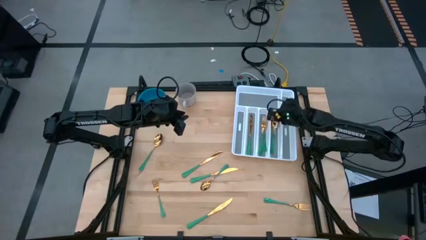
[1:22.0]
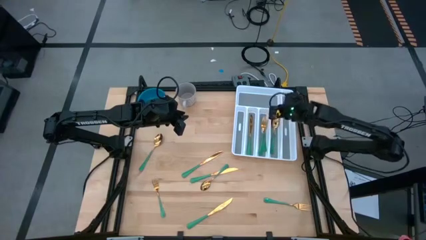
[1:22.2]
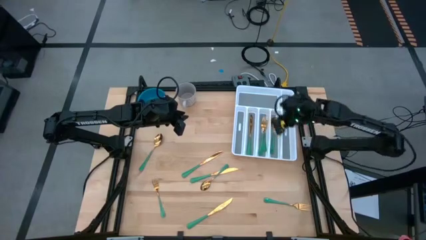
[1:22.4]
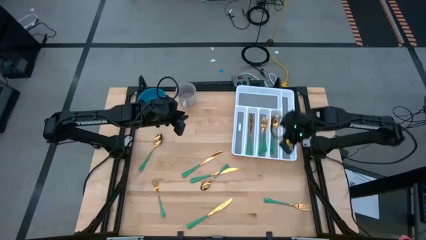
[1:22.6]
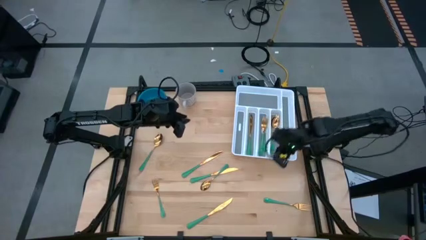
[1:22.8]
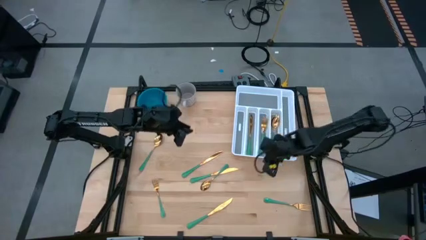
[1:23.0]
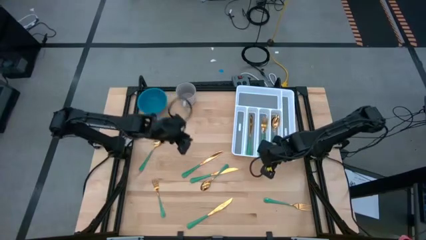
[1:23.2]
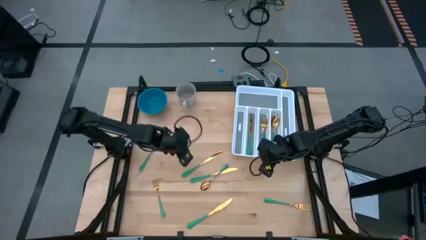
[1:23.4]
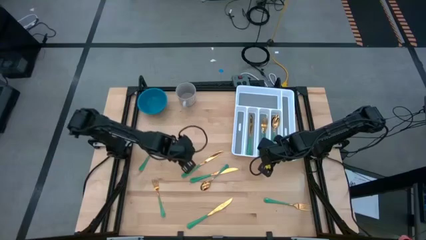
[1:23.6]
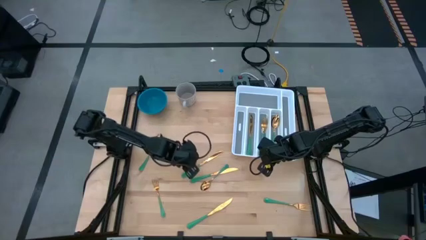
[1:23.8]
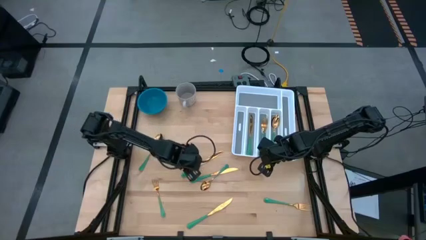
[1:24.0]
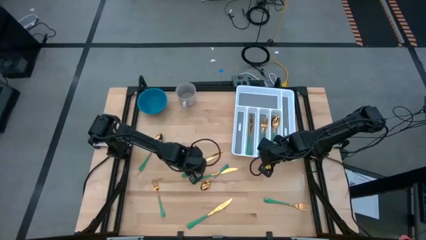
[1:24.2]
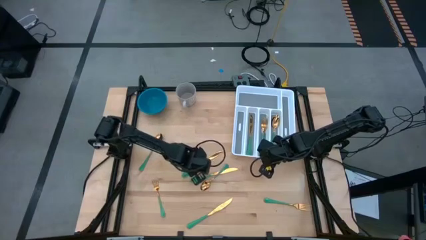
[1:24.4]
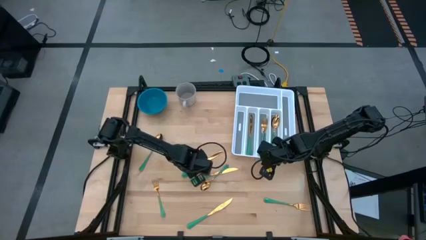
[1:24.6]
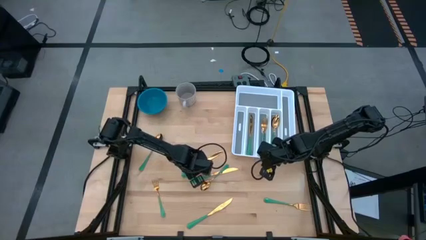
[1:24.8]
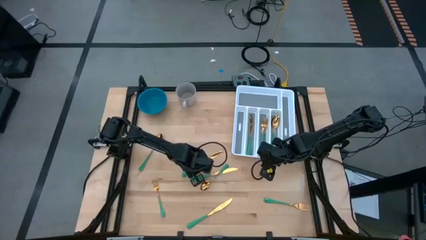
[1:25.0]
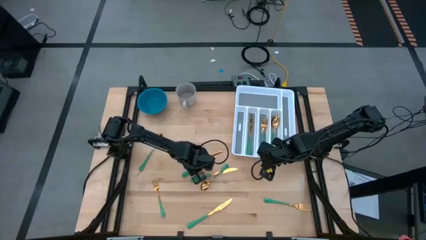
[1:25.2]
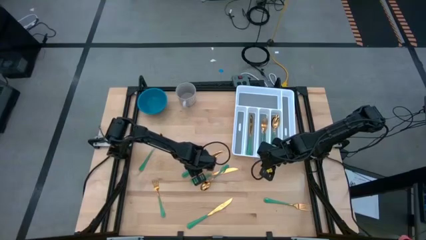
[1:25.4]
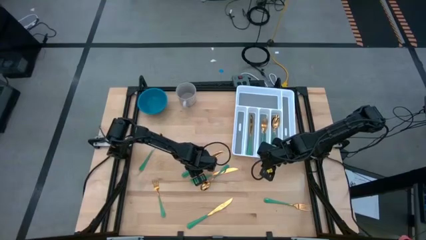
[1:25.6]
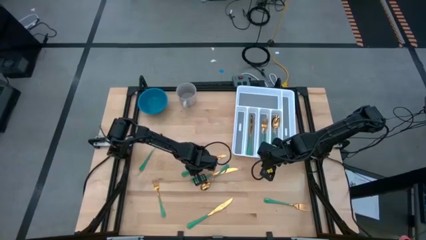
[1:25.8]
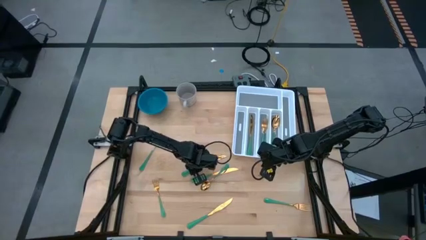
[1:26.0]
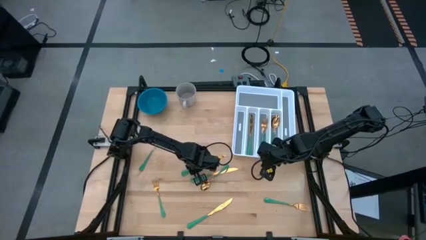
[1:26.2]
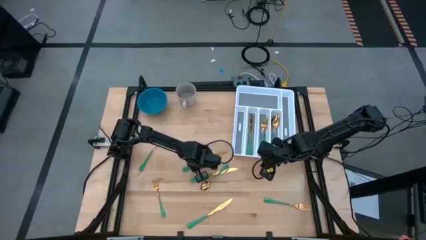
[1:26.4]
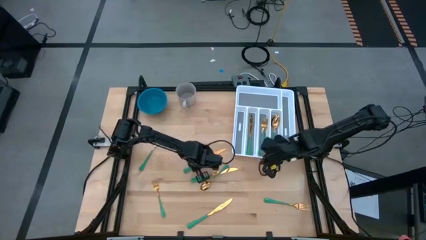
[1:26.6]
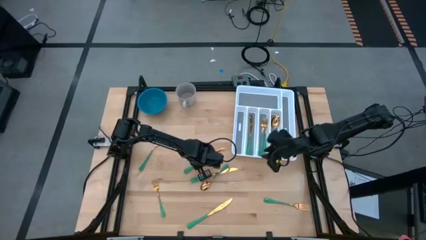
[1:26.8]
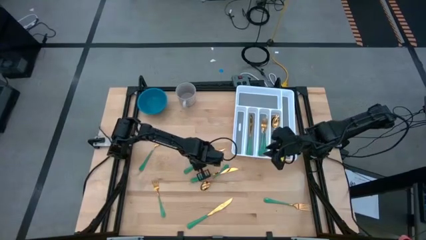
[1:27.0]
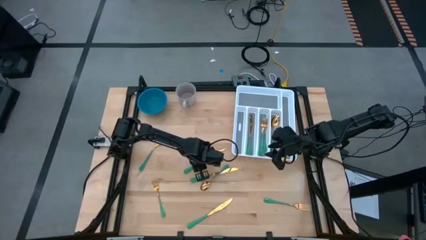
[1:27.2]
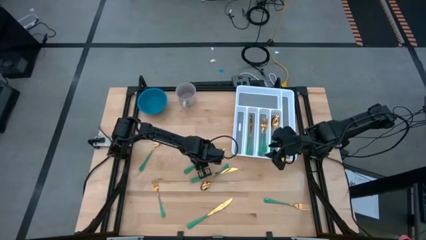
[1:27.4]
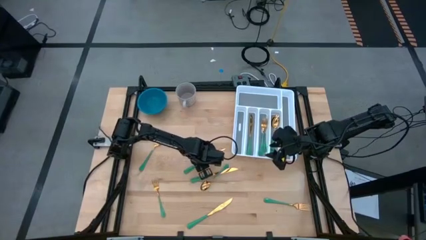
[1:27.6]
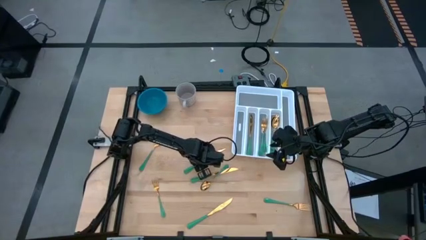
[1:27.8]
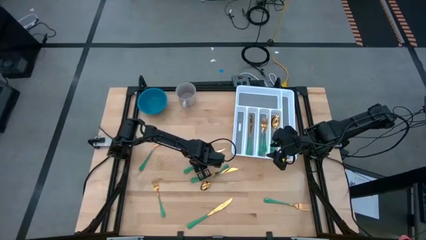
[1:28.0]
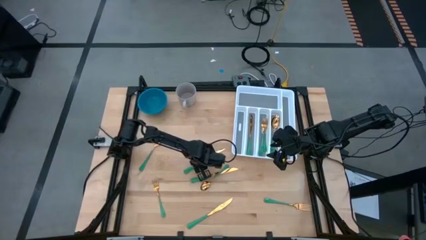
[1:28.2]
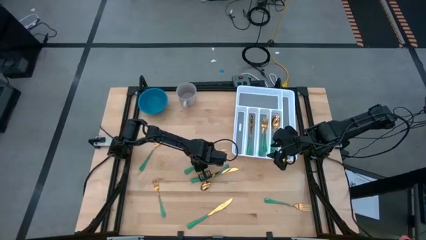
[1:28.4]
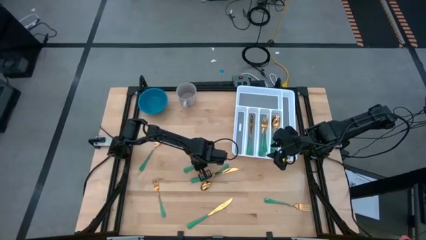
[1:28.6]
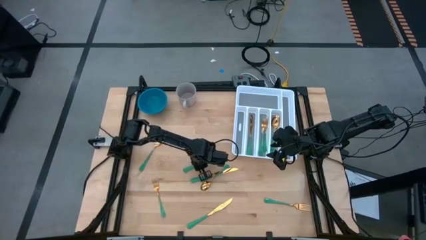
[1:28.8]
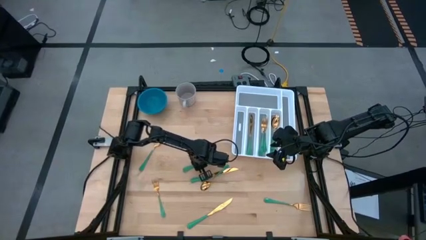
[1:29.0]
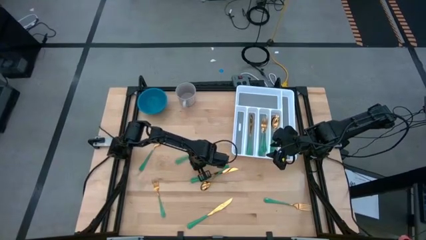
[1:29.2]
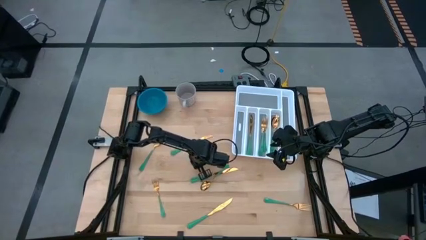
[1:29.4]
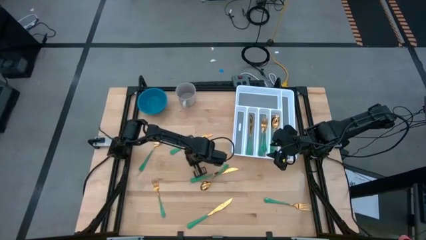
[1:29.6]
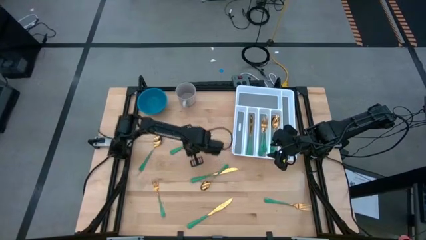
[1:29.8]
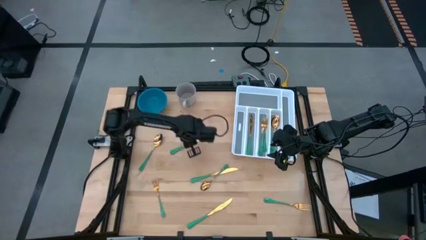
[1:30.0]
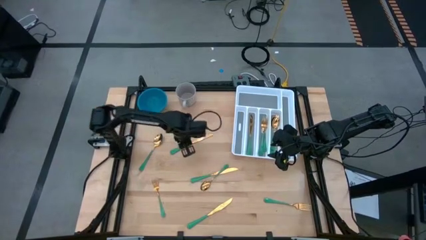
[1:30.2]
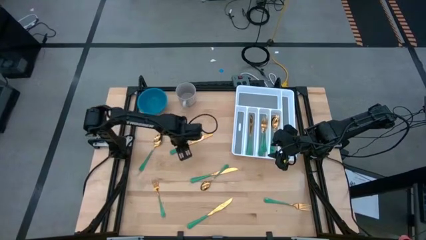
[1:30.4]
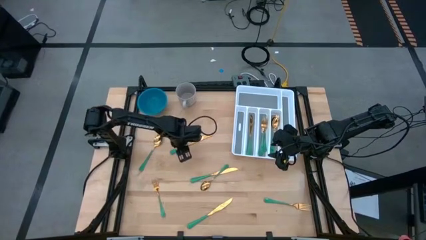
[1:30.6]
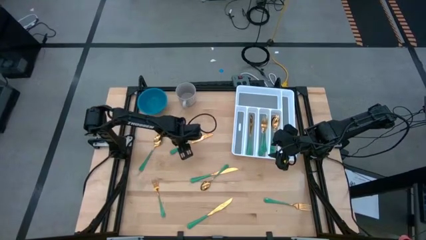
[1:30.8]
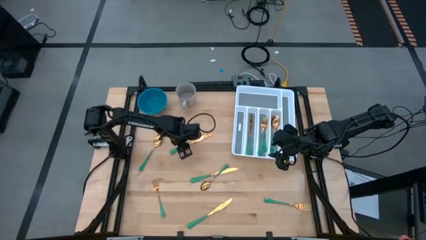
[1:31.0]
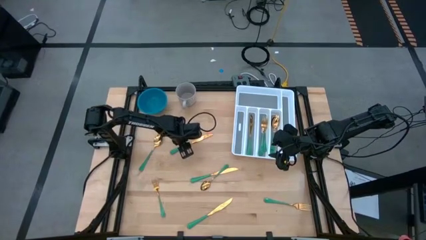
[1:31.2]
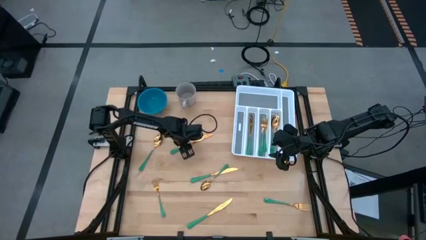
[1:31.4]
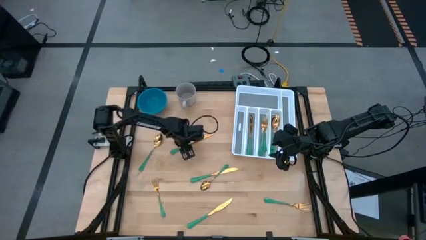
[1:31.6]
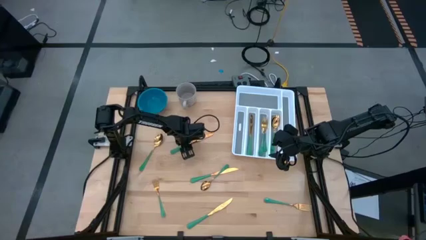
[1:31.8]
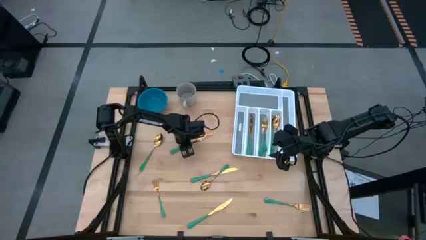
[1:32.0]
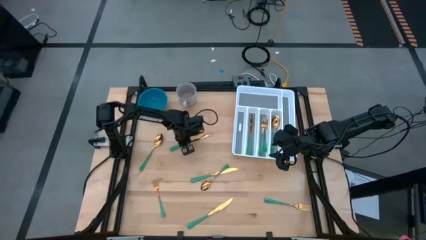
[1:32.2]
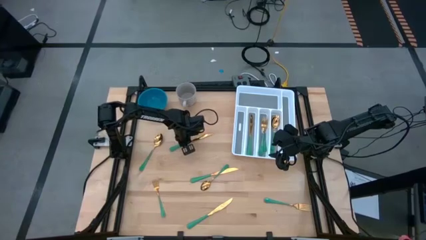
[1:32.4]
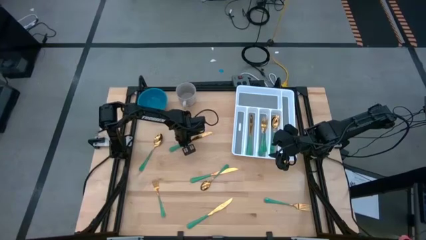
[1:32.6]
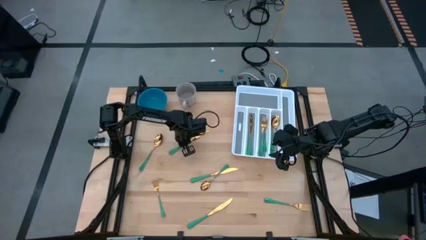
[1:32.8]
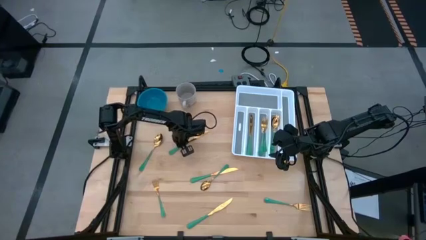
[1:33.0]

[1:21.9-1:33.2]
Task: Sort silverware
Put the green table knife into the white cutlery tray
